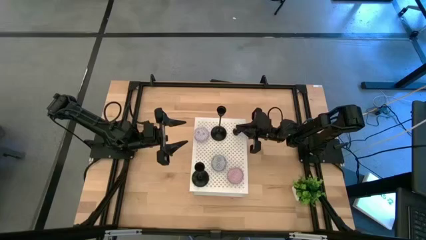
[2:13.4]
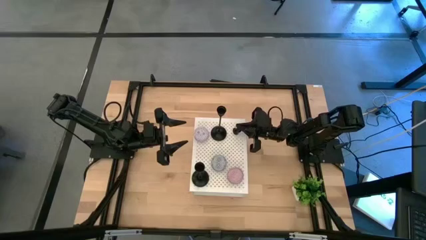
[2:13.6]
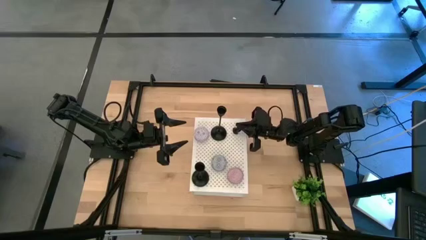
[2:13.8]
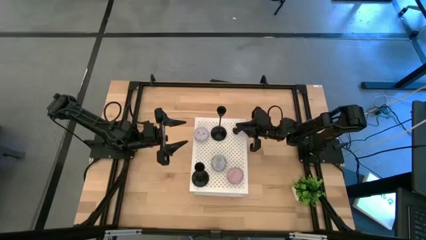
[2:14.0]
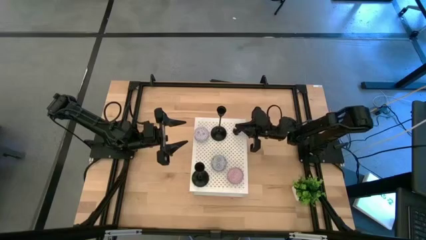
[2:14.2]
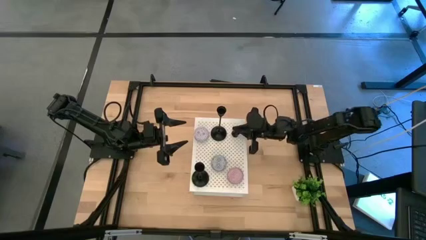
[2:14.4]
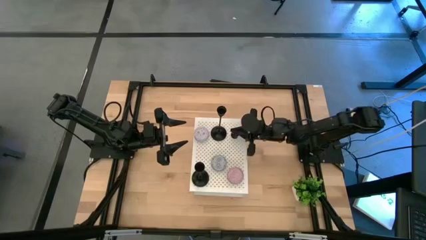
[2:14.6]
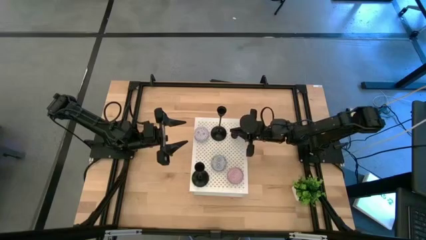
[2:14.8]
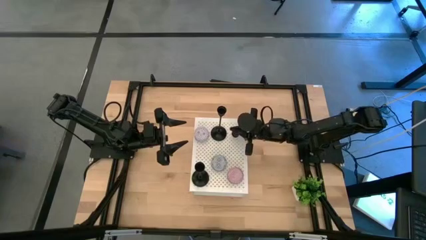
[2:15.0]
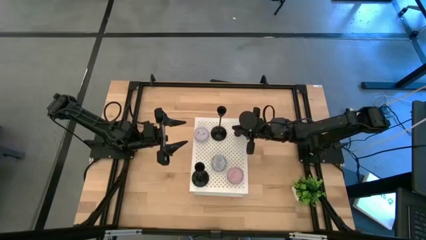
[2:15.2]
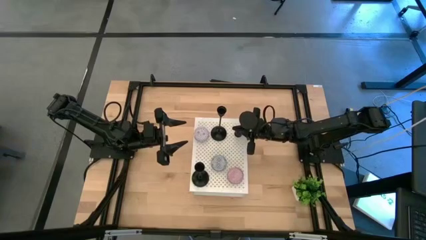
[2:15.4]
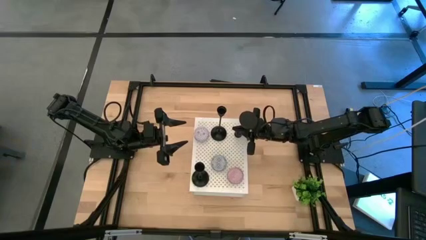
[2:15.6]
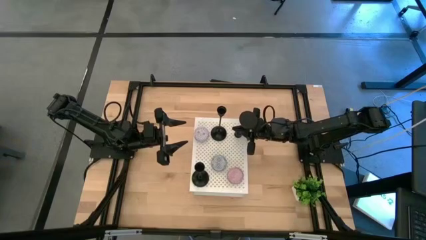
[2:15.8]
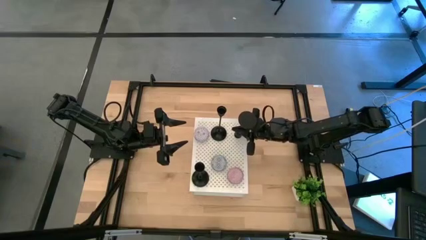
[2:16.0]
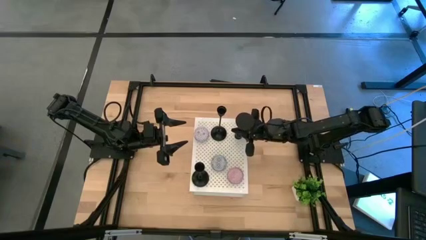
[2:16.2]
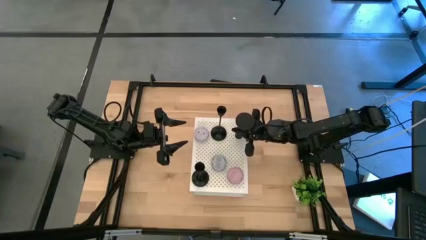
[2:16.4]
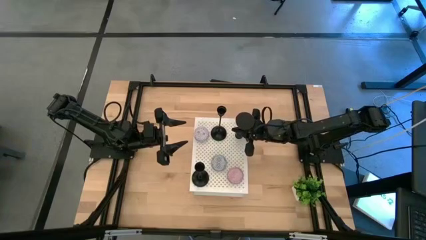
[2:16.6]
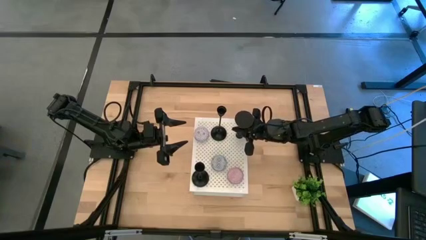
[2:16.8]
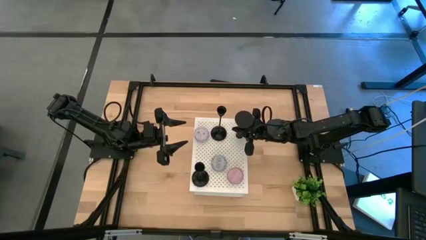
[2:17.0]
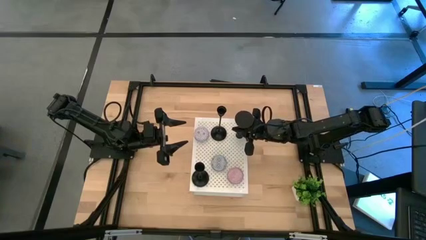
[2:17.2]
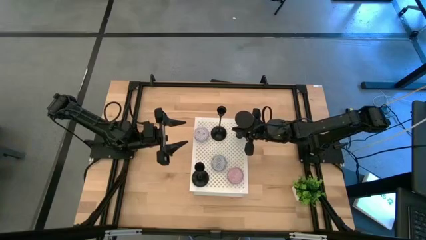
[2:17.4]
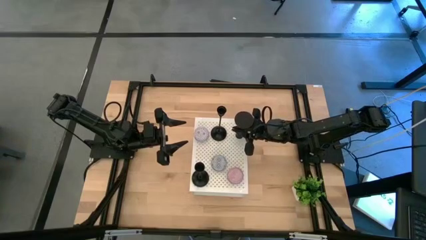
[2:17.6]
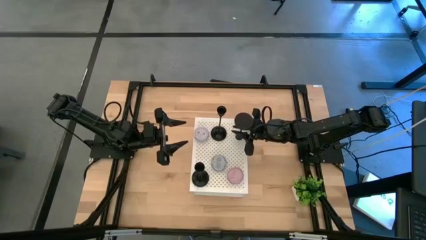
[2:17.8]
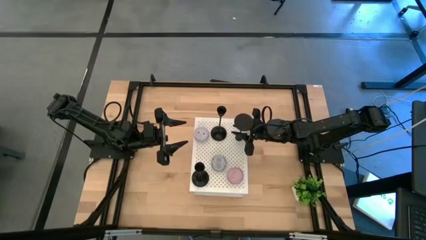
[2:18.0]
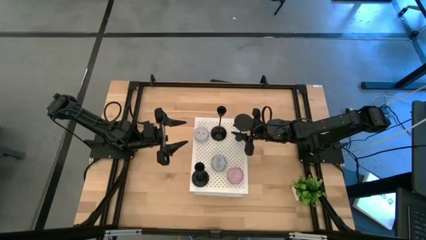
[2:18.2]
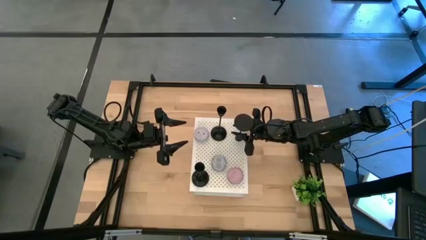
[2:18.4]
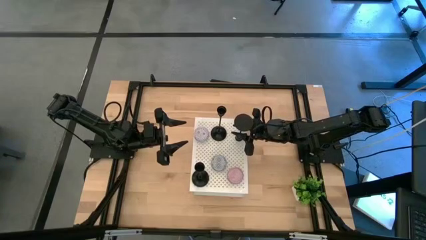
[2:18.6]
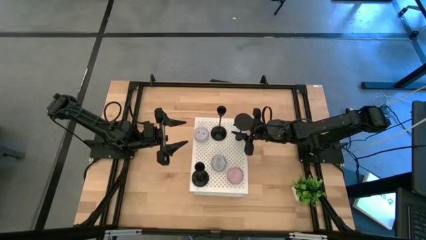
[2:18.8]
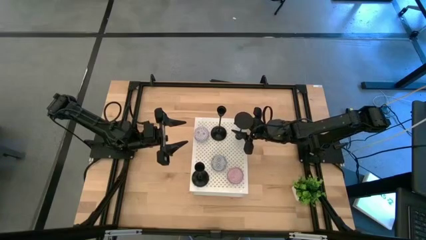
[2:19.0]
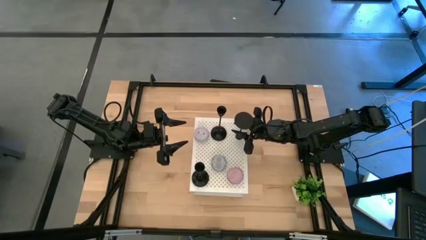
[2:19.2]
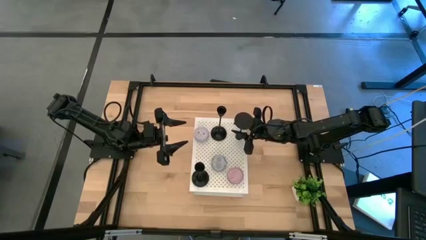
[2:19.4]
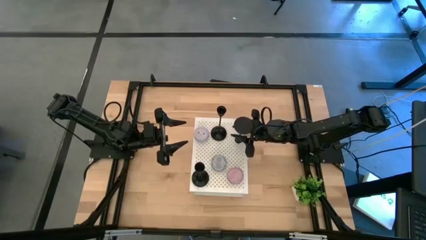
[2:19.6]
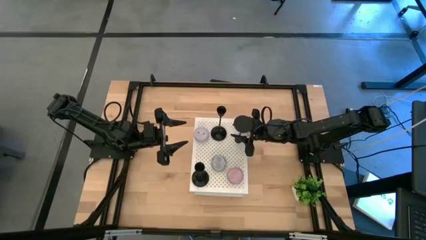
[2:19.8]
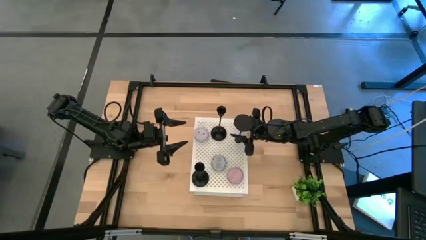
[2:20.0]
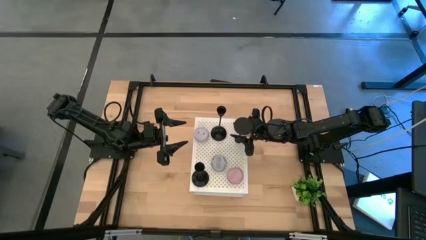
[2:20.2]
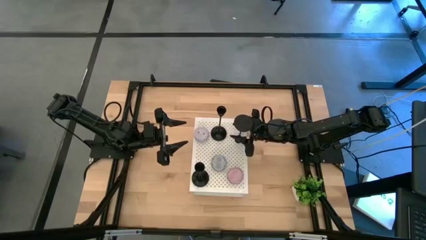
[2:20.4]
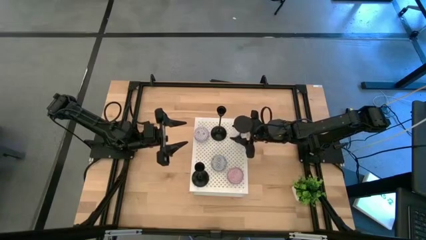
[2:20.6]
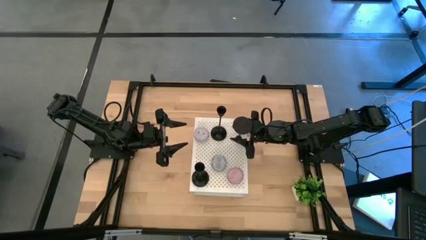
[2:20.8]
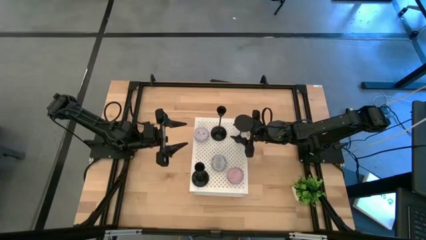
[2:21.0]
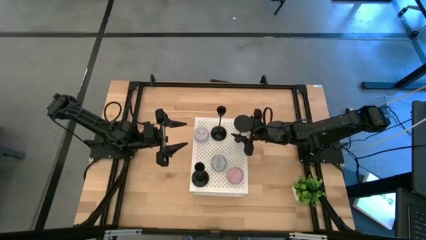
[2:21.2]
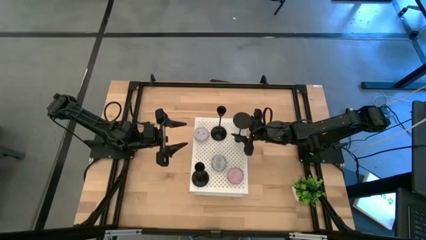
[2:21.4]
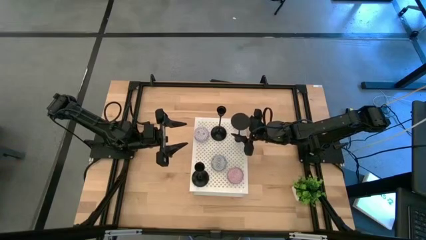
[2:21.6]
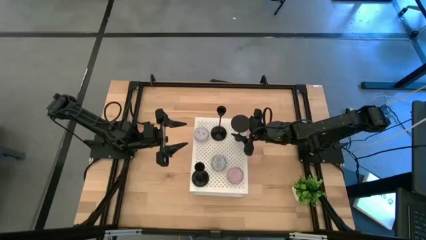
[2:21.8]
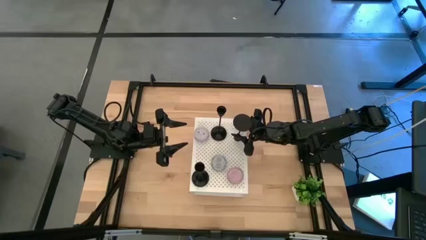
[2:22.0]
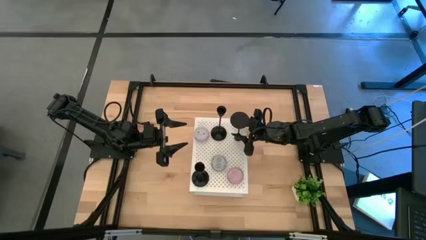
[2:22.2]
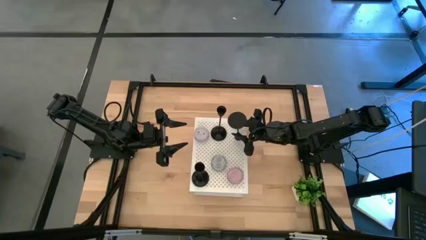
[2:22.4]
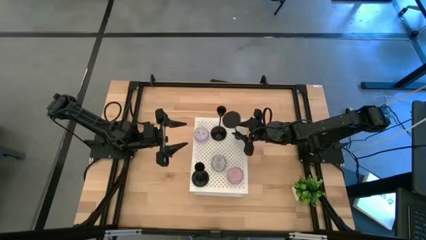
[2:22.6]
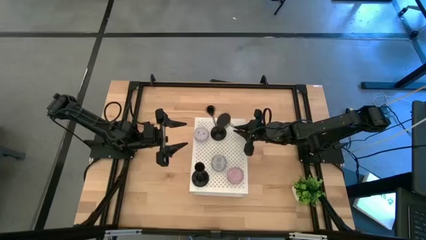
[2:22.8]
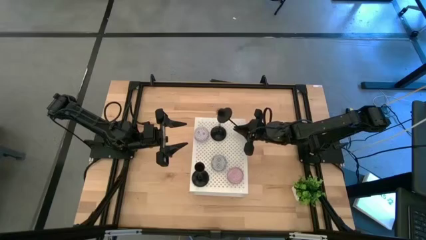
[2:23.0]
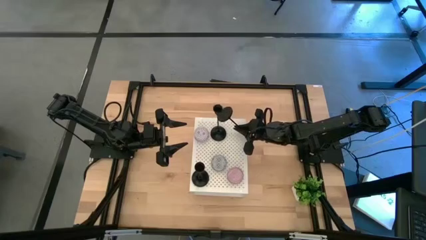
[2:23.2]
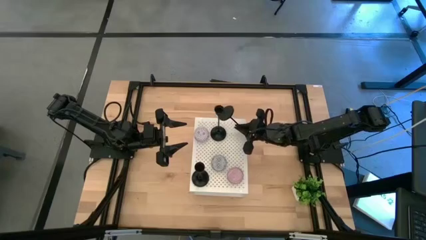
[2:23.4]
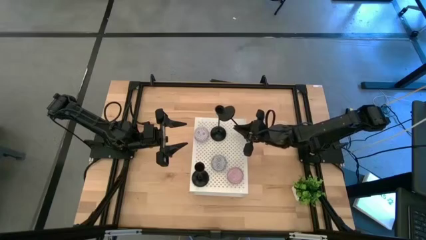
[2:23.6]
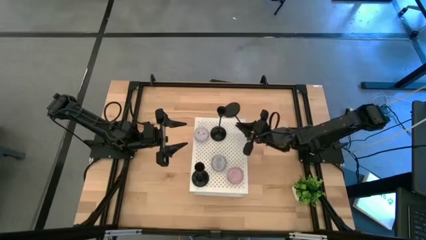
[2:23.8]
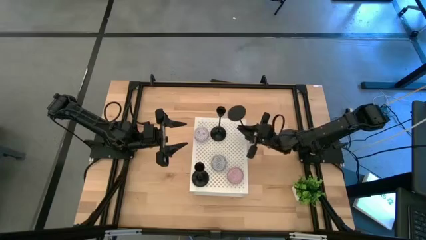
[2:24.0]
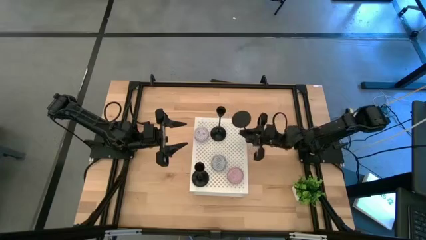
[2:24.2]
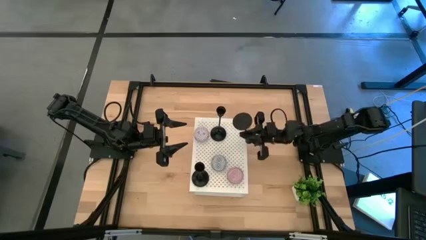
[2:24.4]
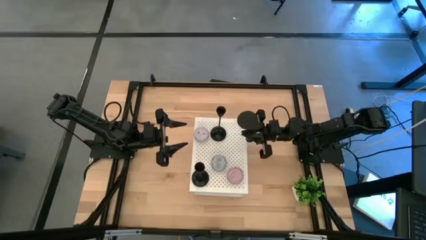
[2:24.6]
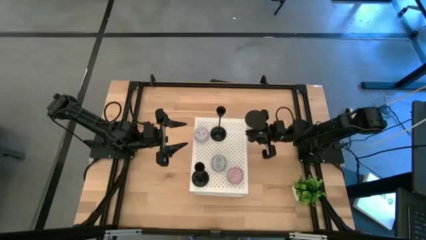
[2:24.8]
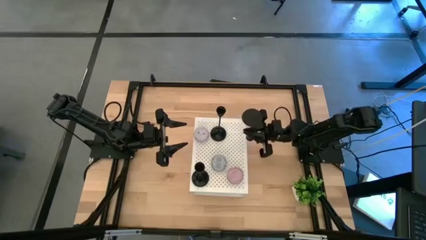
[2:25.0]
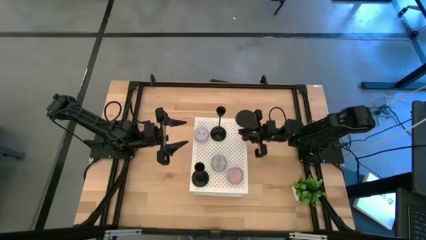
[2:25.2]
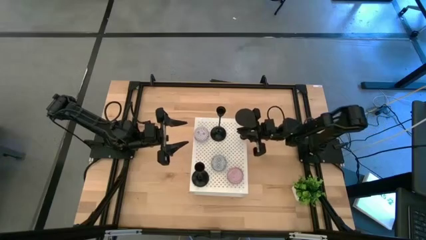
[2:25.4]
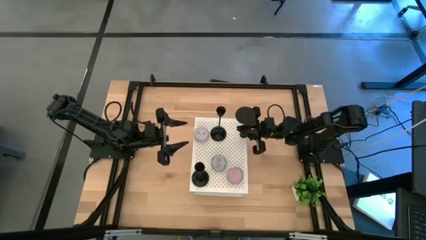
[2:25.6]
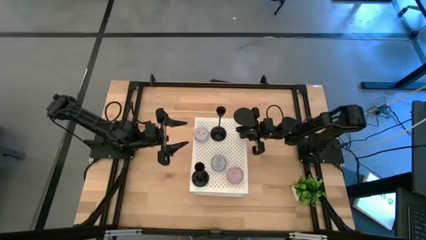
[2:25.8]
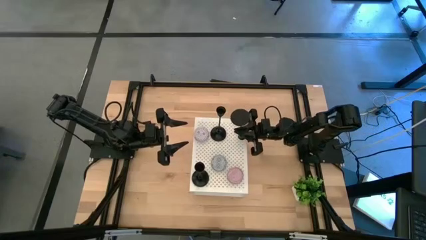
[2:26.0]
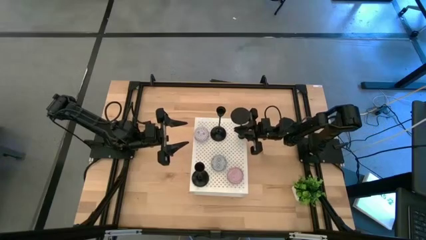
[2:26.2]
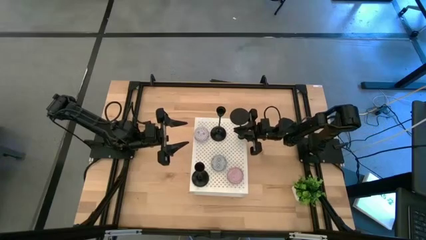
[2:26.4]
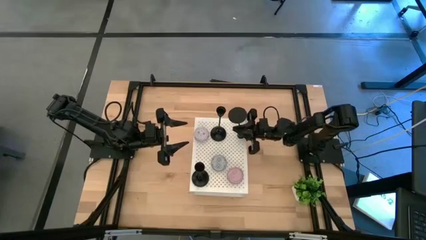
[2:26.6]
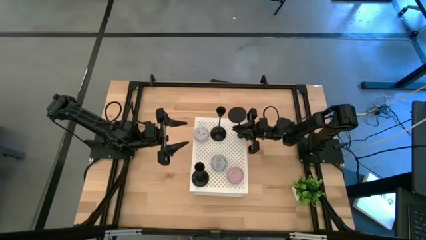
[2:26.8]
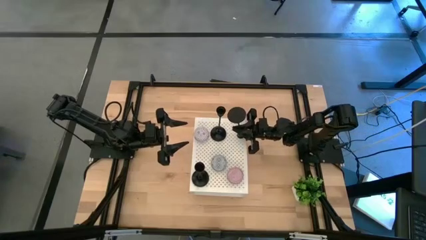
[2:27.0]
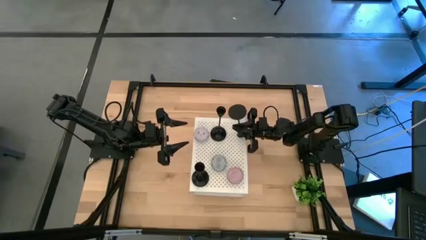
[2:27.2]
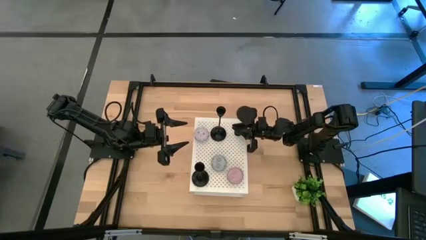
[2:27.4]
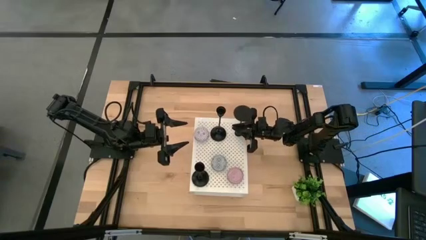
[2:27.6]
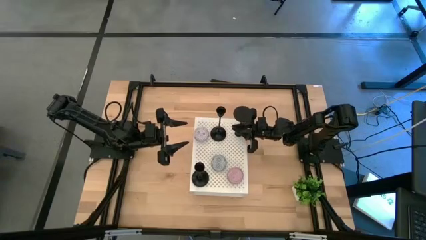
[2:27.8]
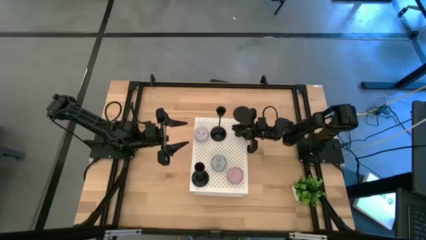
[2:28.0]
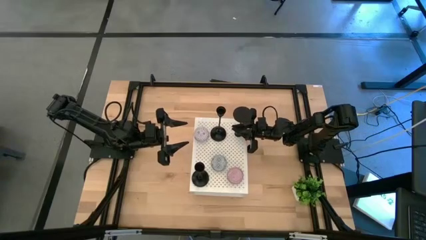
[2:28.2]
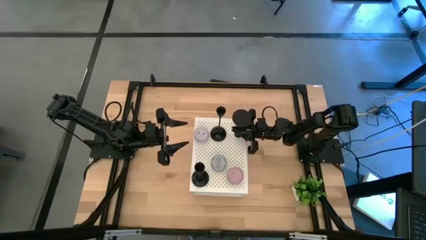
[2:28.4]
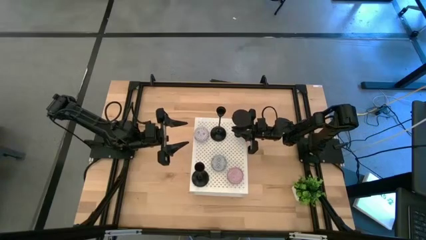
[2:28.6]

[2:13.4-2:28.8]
Task: Pick & Place candle stick holders
Put the candle holder on the shelf
